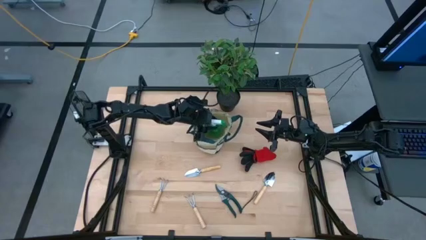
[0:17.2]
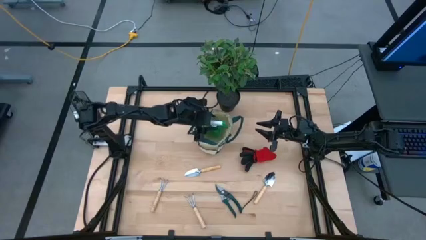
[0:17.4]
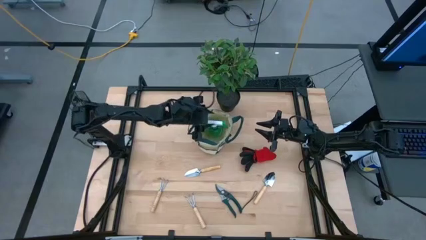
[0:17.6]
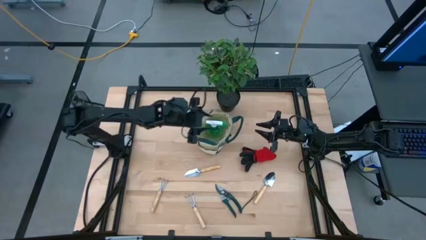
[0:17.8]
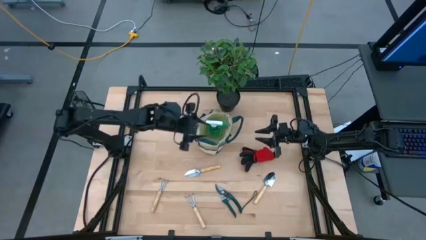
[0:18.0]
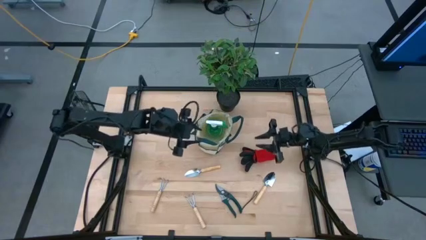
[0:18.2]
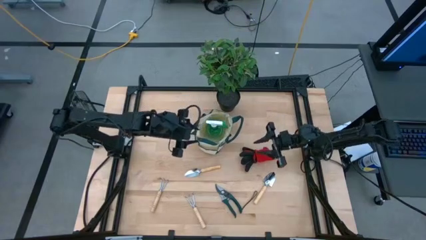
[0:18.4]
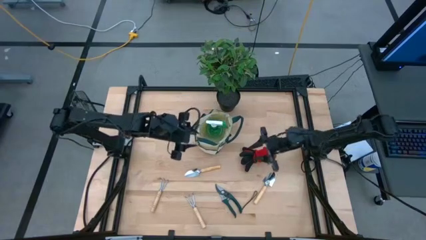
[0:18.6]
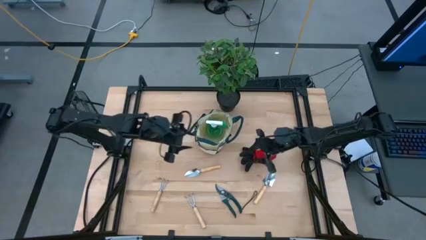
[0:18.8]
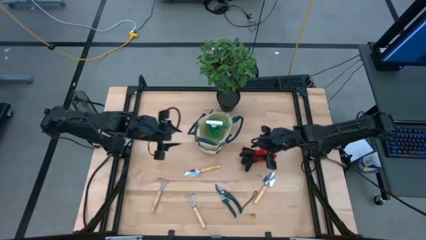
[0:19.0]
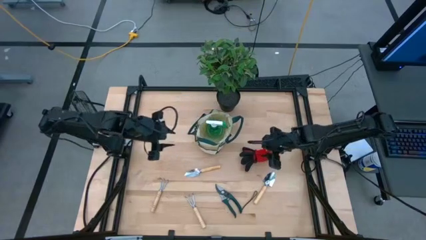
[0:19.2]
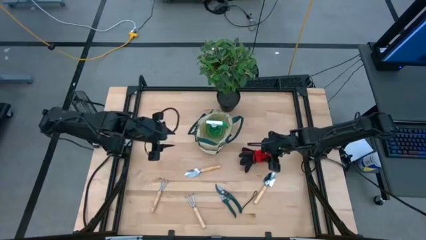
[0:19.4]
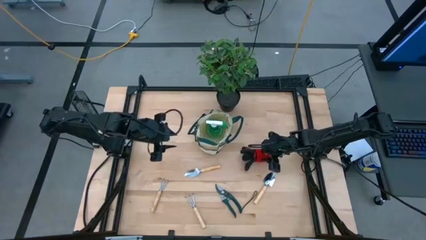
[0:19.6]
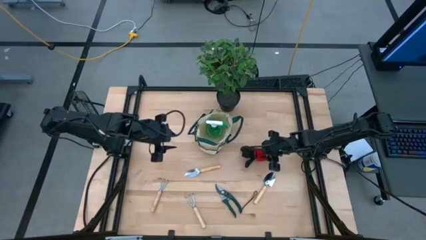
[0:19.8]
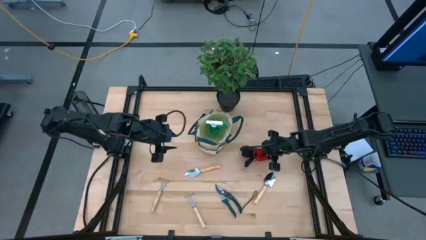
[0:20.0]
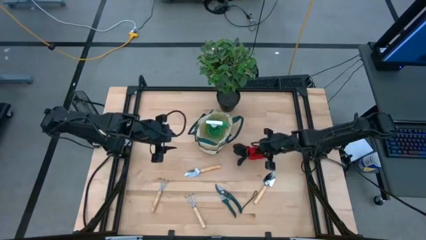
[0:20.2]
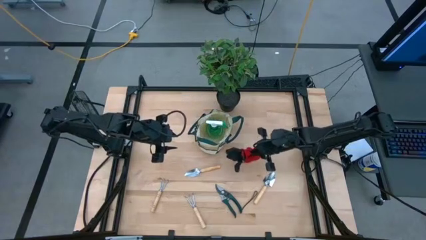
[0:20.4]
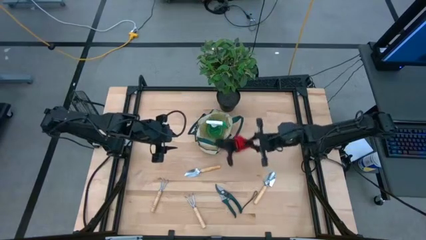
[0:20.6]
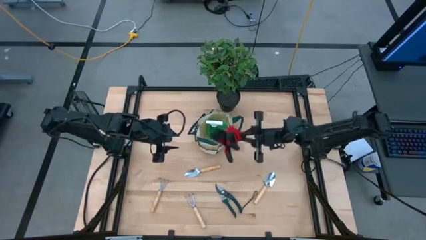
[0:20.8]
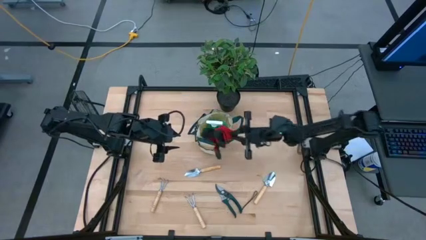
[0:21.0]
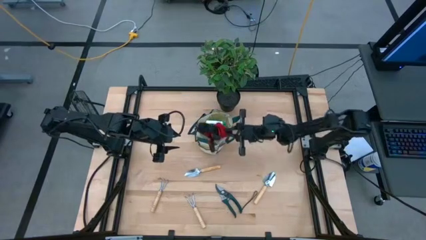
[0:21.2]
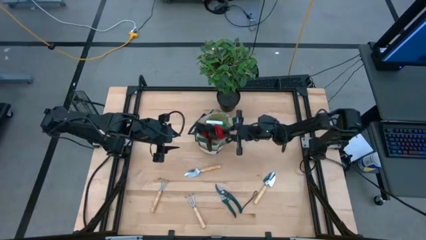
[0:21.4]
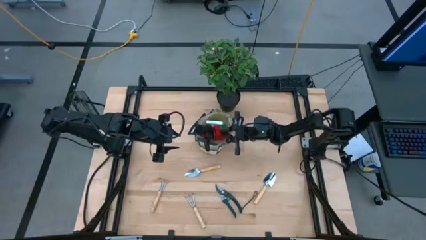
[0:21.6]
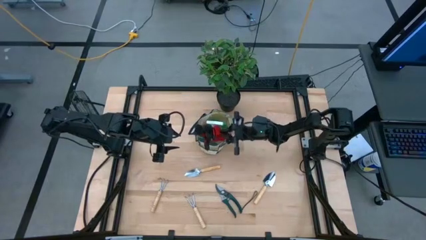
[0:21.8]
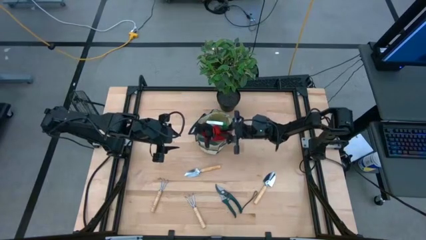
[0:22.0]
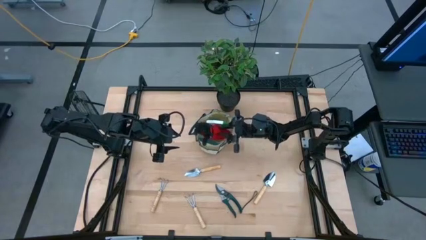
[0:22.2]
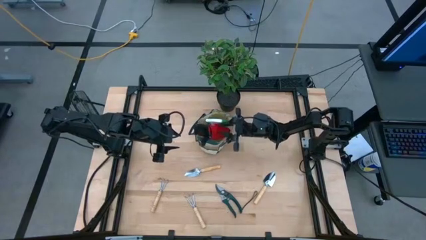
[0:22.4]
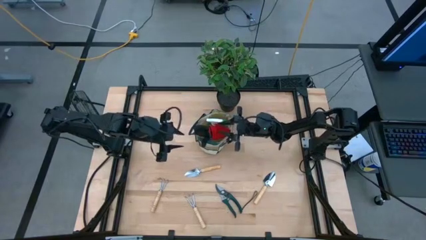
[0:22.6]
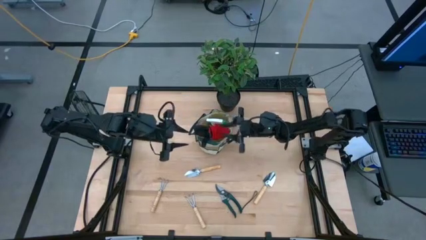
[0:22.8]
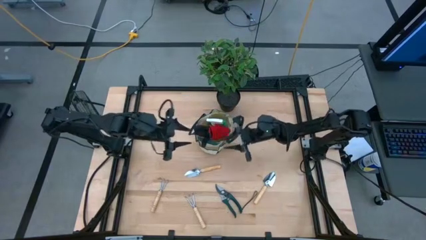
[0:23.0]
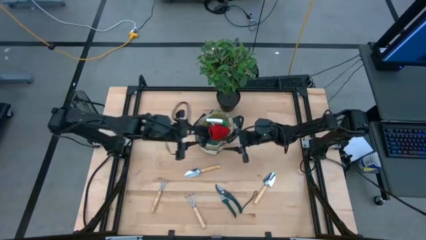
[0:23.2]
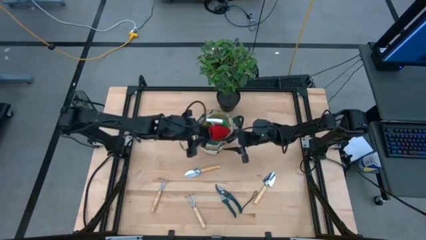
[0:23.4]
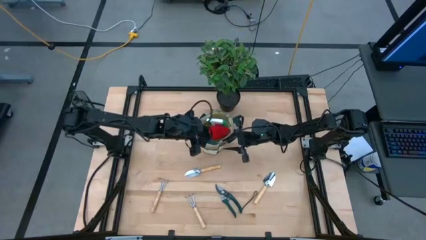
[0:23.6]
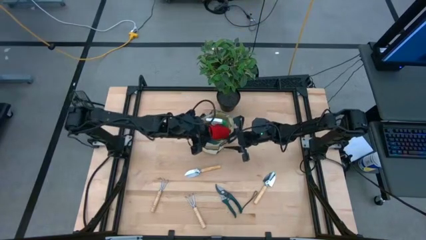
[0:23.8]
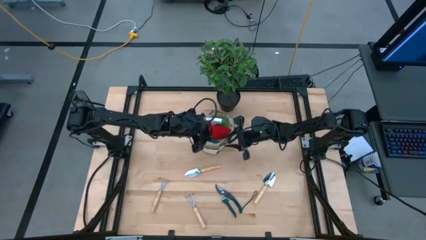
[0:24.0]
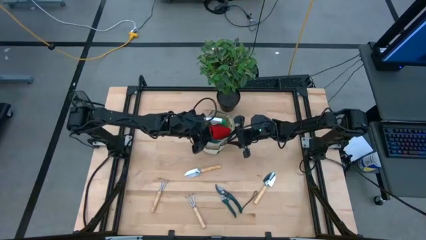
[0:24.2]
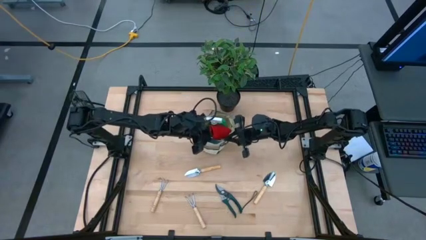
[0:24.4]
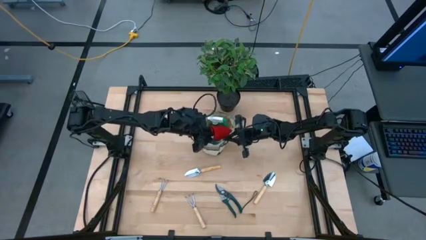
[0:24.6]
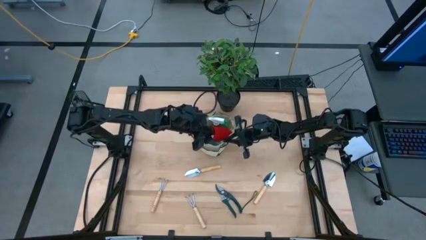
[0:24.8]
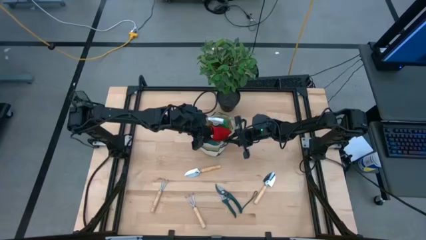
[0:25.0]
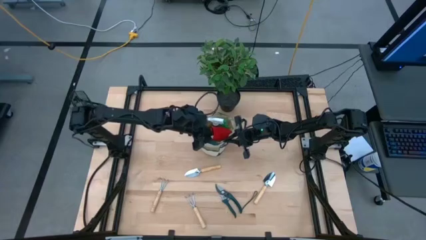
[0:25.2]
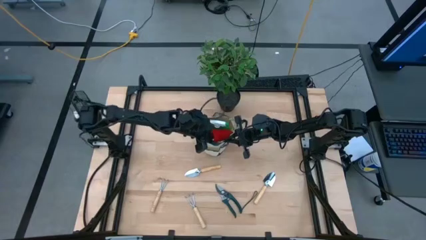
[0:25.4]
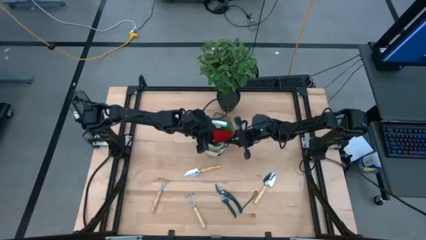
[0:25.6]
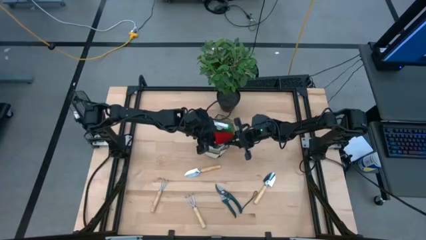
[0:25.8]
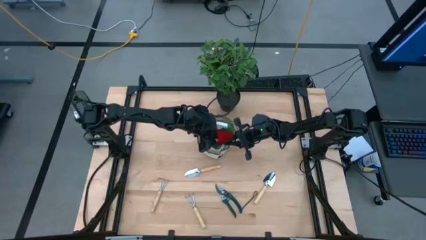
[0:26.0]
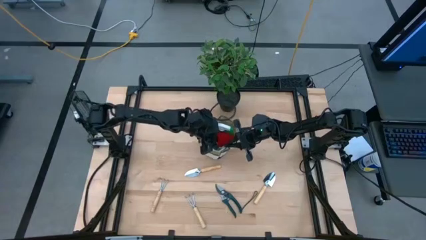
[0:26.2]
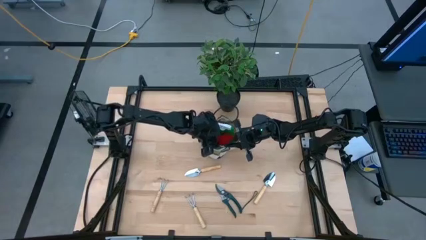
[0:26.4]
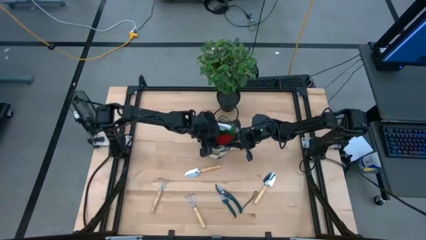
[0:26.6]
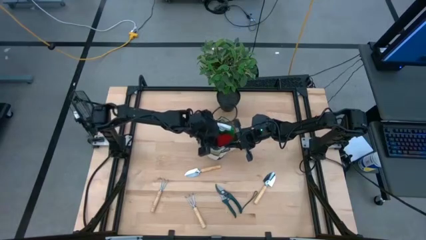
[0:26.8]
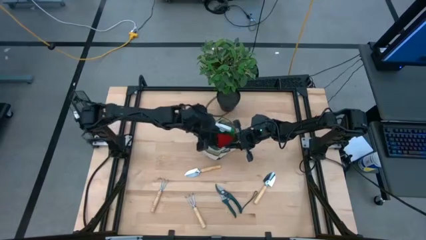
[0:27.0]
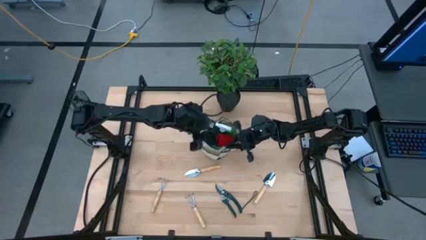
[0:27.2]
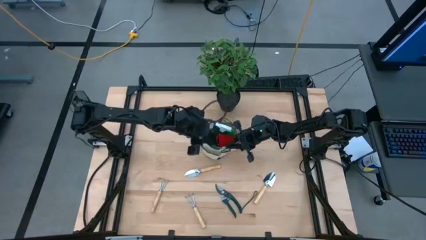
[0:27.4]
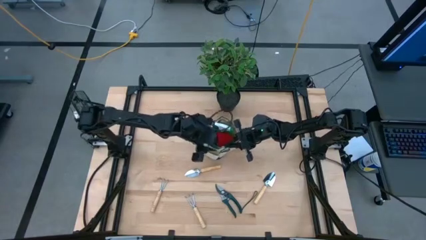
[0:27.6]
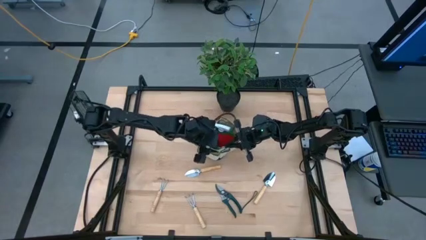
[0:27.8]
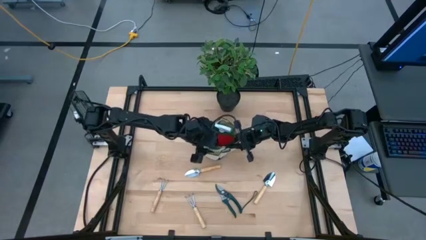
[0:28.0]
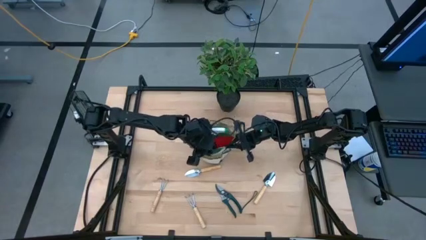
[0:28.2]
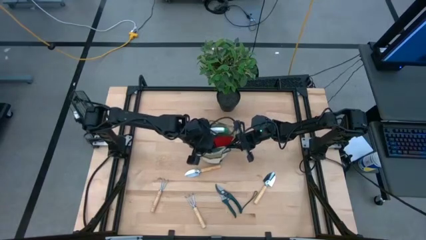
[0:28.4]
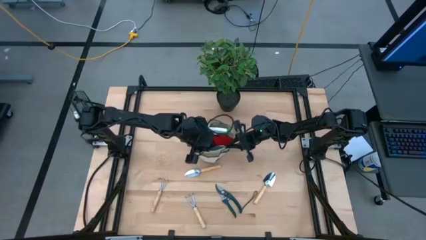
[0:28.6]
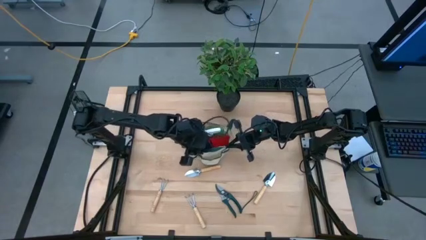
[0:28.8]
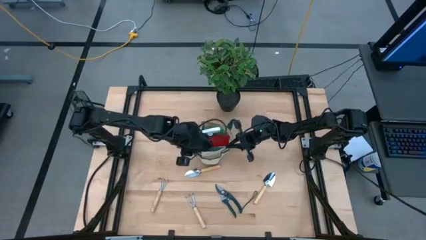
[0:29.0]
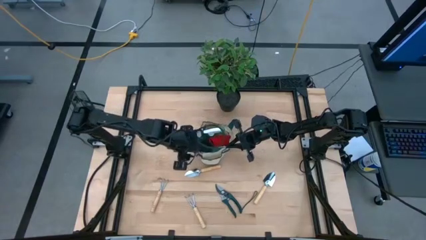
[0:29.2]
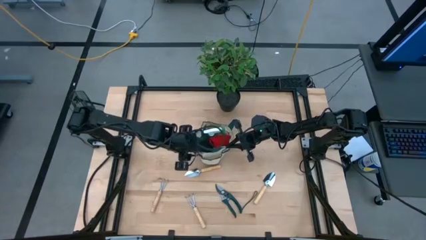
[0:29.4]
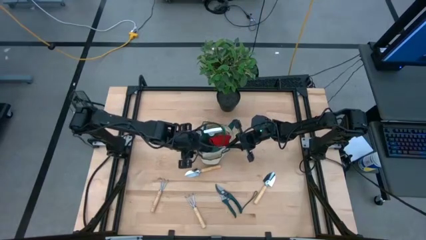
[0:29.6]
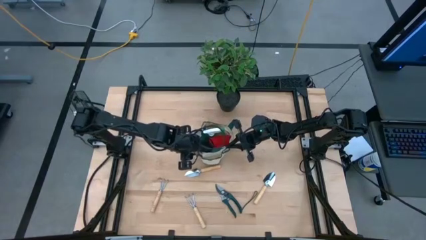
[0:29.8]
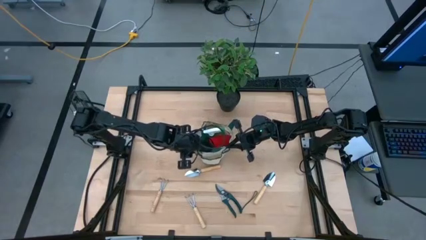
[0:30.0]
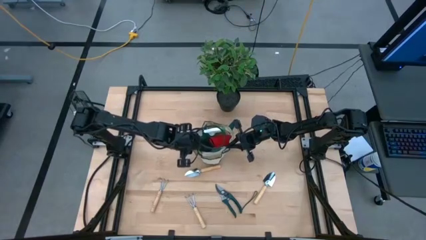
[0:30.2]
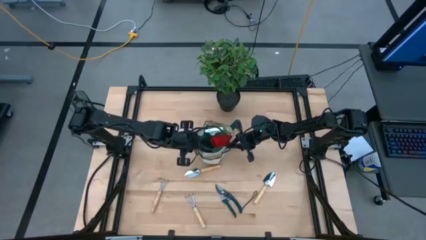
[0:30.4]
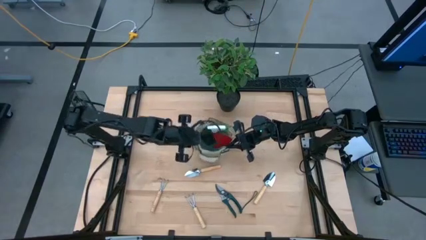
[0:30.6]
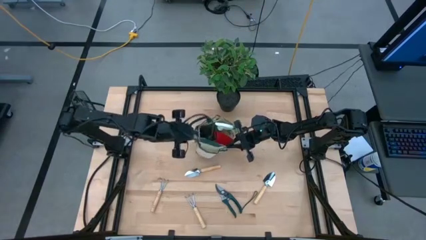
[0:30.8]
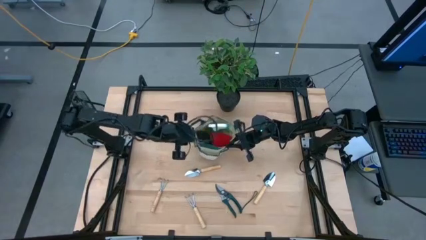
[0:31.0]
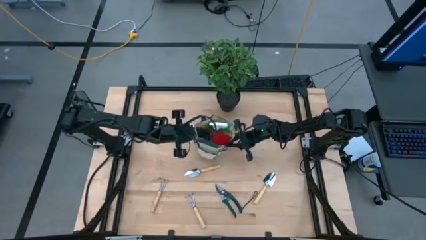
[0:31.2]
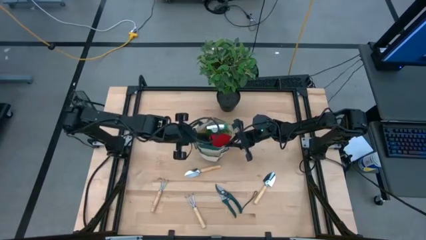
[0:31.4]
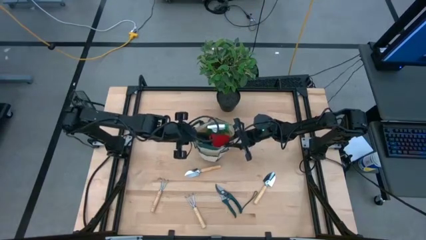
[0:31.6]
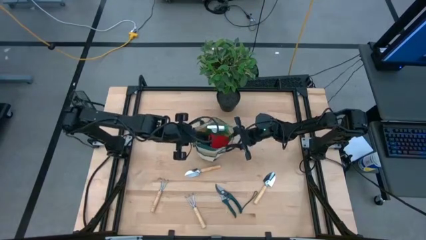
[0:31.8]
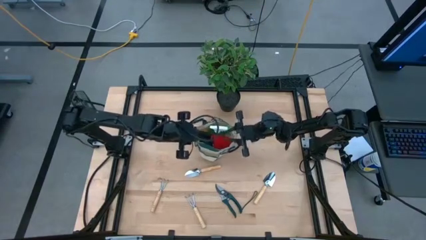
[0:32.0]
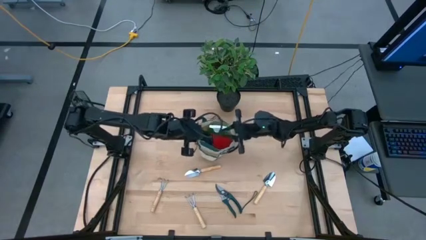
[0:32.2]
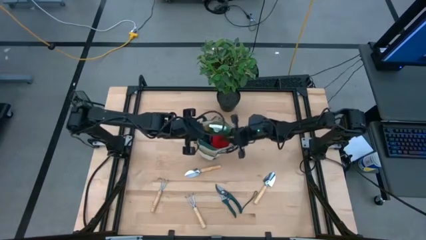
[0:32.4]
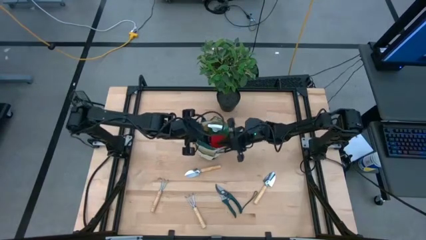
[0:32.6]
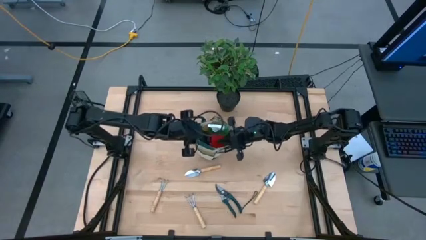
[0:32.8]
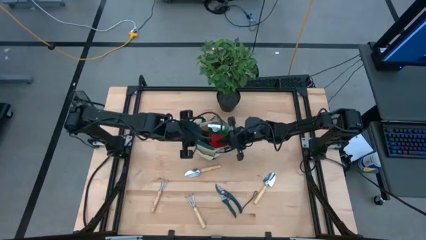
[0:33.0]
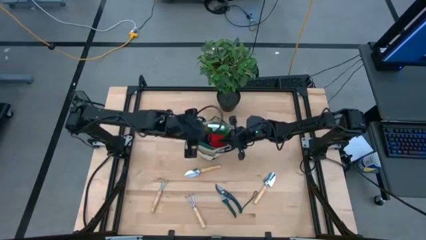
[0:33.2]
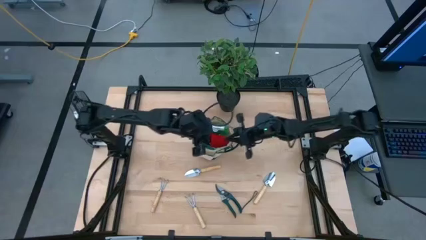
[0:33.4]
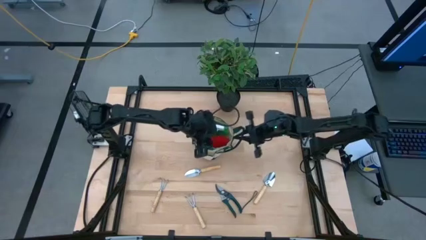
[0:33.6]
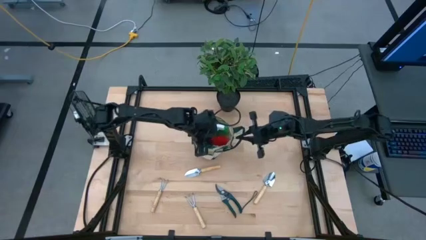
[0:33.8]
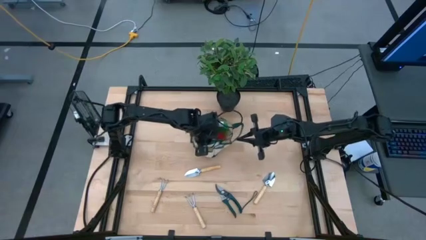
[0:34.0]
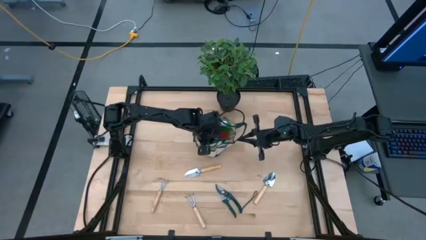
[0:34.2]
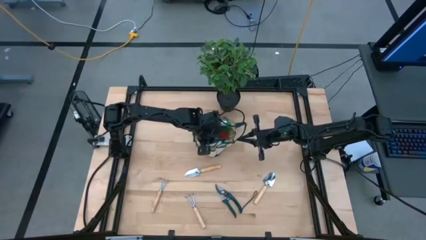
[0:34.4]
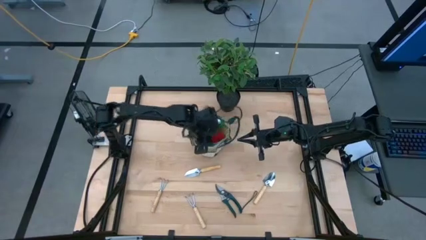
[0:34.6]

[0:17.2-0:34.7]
Task: Pick & Place Garden tools in Gardening bag
Put the red gloves in the gardening gloves
